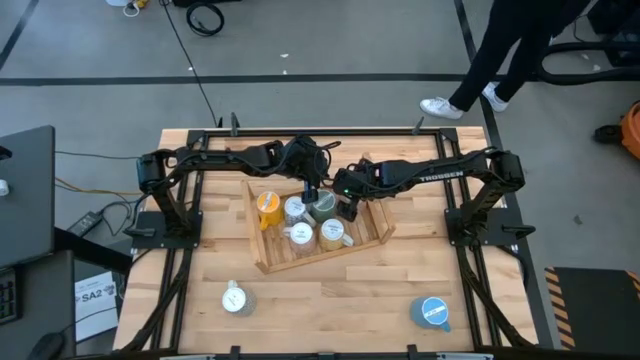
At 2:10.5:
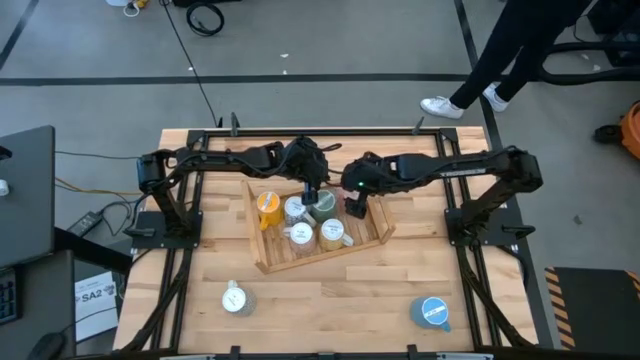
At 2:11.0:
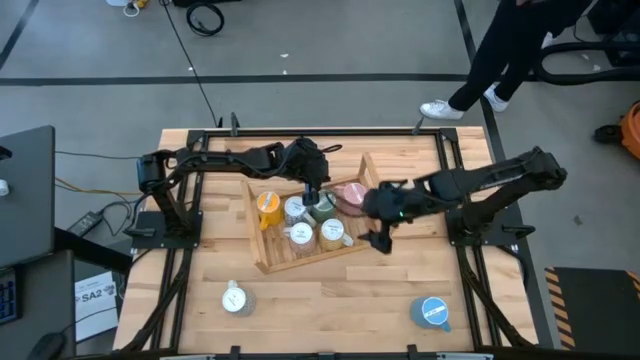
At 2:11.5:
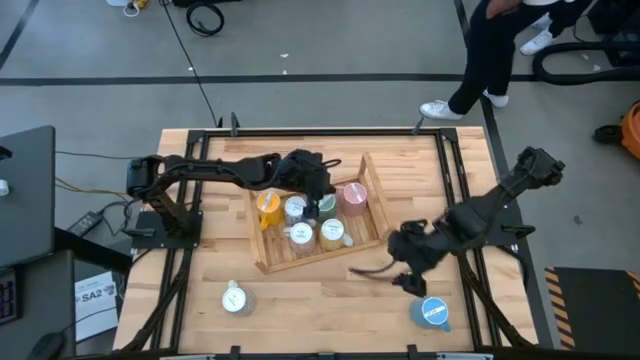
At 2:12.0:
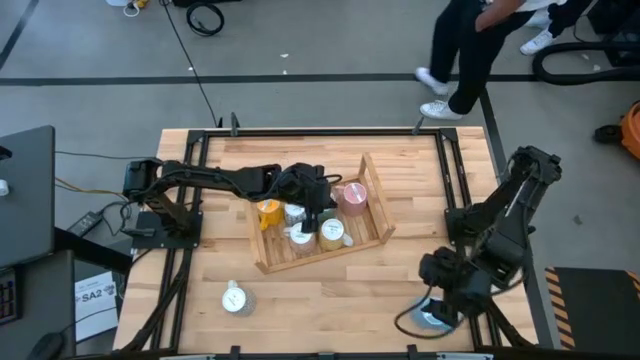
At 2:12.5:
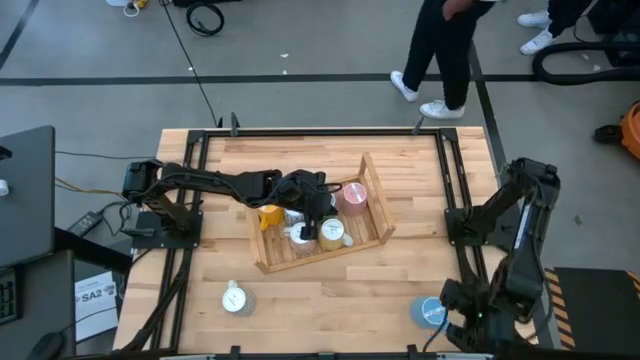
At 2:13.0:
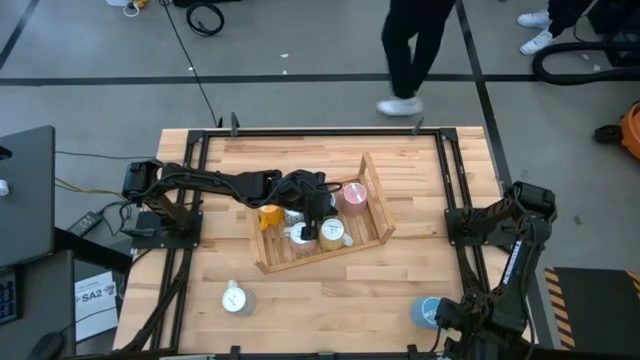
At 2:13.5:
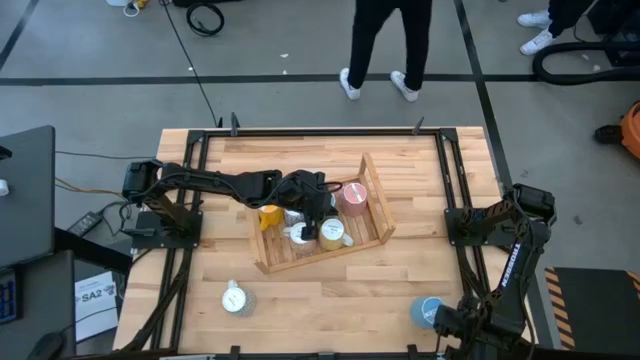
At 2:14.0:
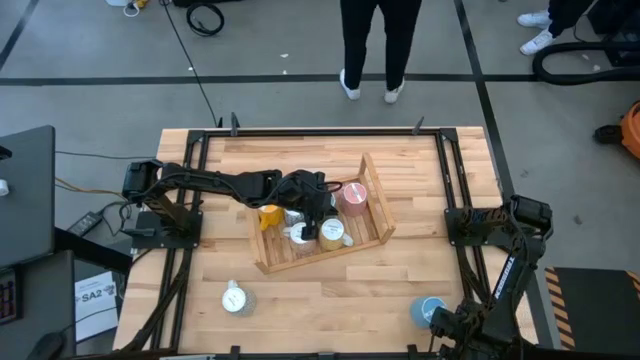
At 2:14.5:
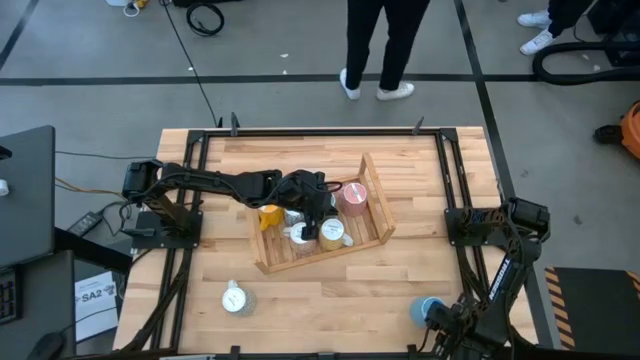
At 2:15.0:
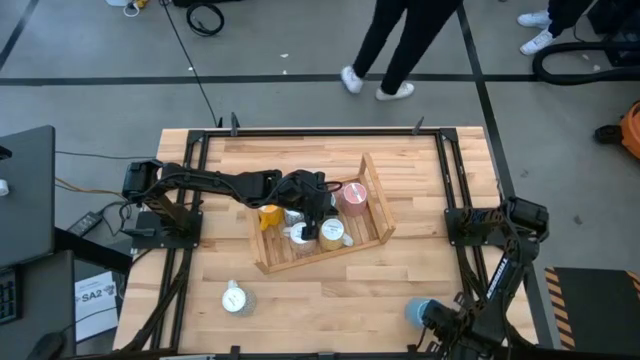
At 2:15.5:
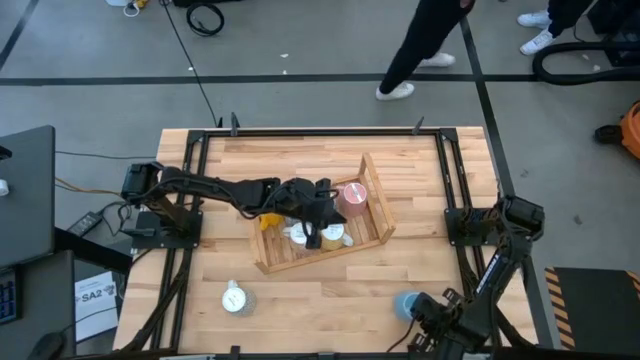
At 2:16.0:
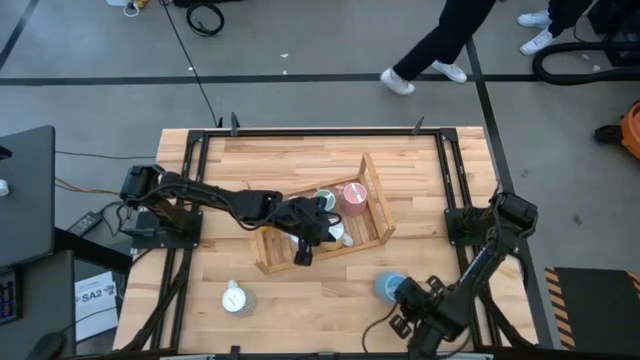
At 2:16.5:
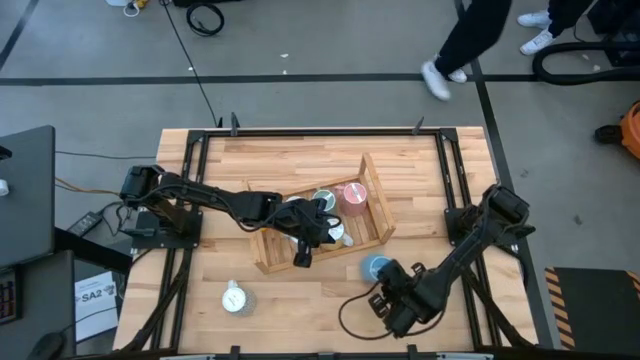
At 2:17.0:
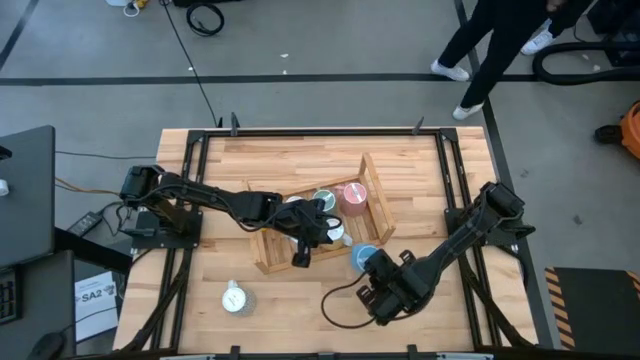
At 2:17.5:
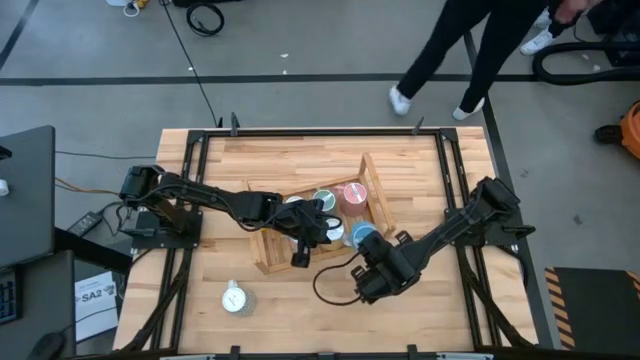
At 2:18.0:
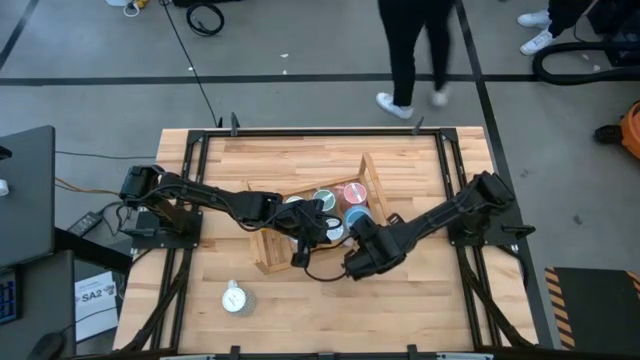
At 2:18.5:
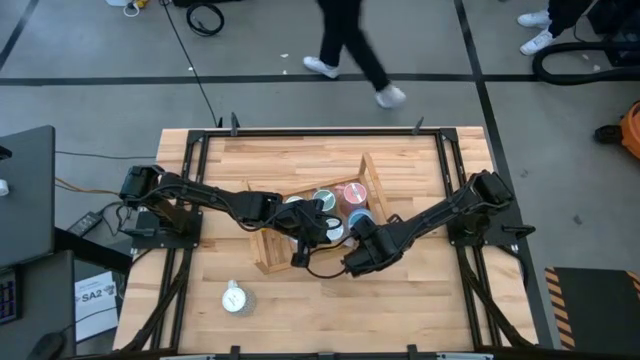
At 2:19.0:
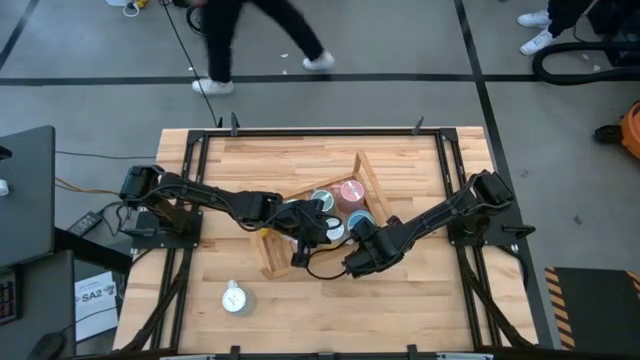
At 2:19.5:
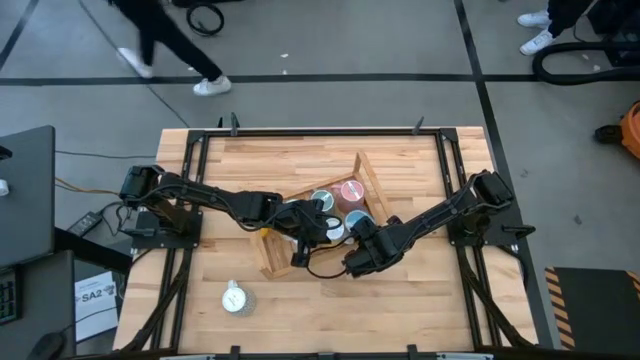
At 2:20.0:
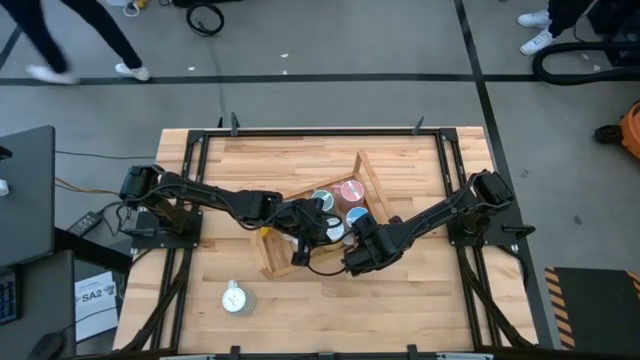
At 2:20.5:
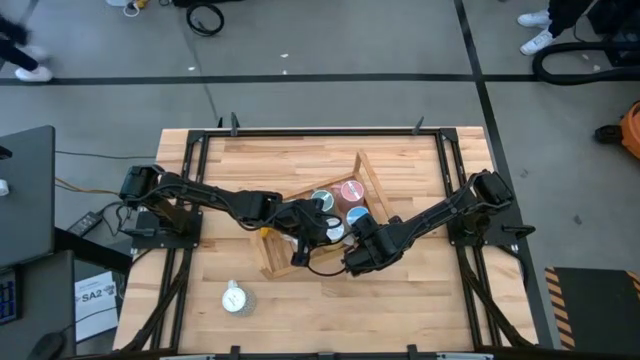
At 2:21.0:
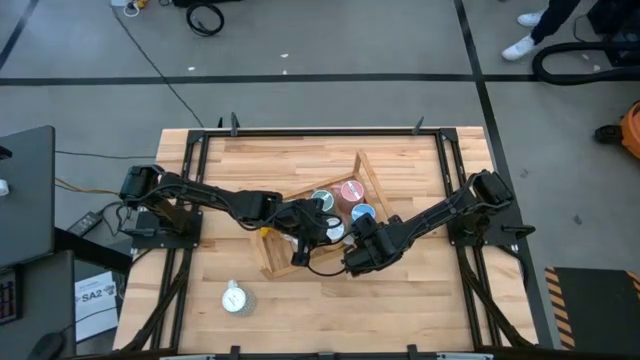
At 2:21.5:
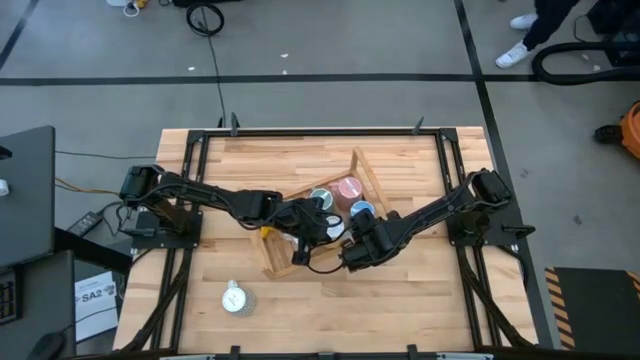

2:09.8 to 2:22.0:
Task: Place coffee mugs
Put the blue mug on the shelf

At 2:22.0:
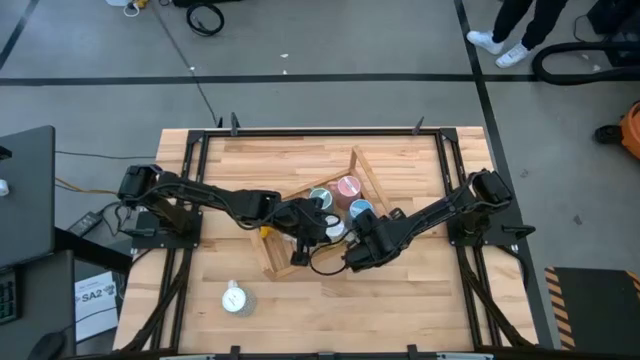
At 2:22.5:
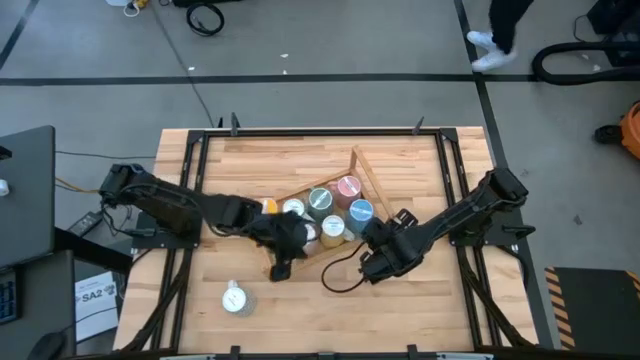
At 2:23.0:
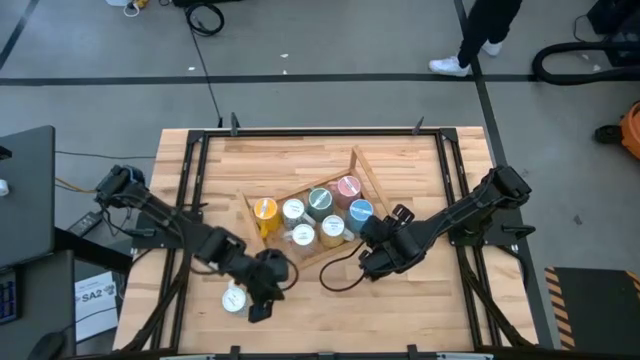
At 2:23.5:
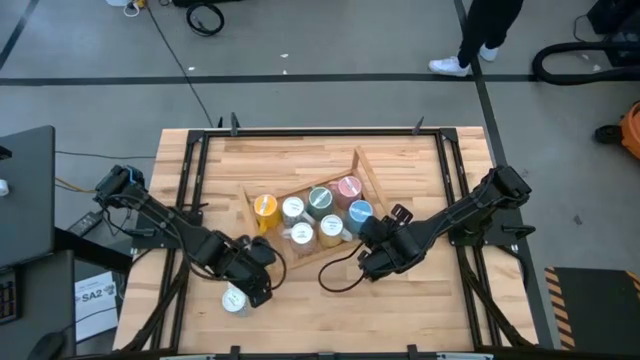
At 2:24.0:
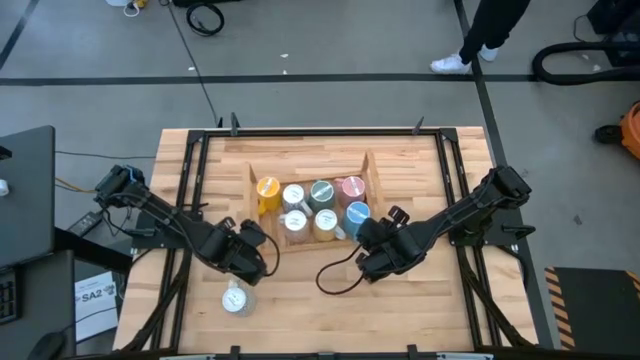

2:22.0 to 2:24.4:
Adjust the shelf

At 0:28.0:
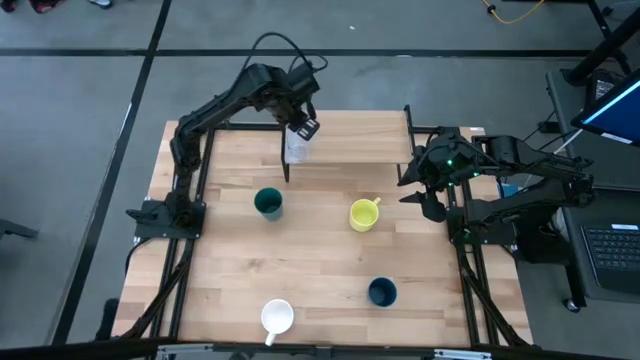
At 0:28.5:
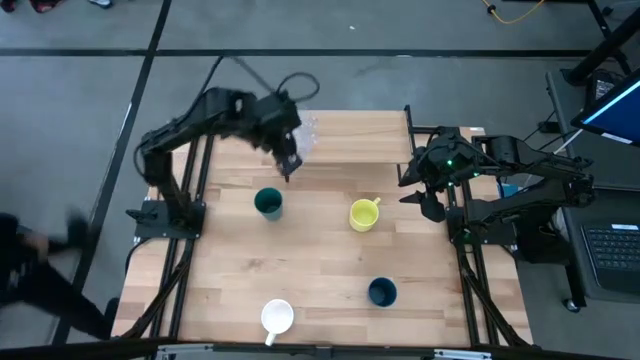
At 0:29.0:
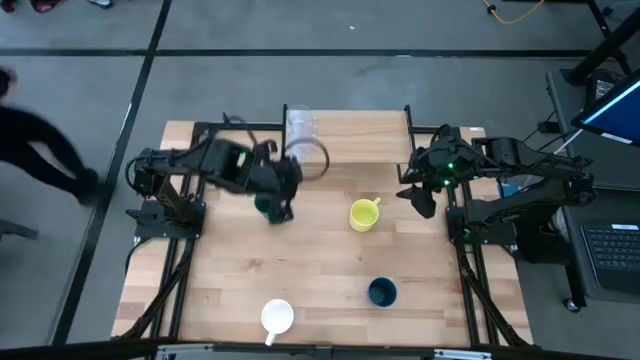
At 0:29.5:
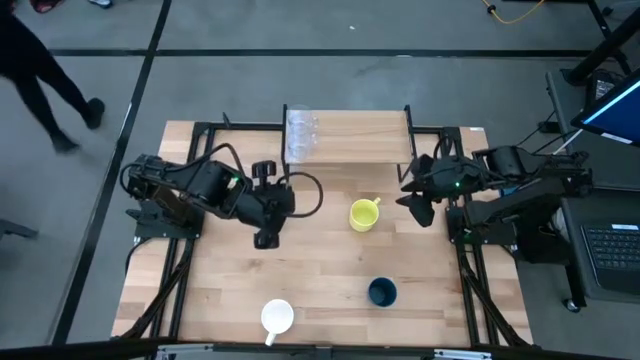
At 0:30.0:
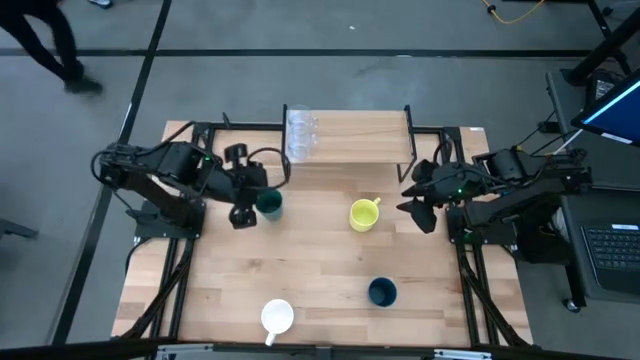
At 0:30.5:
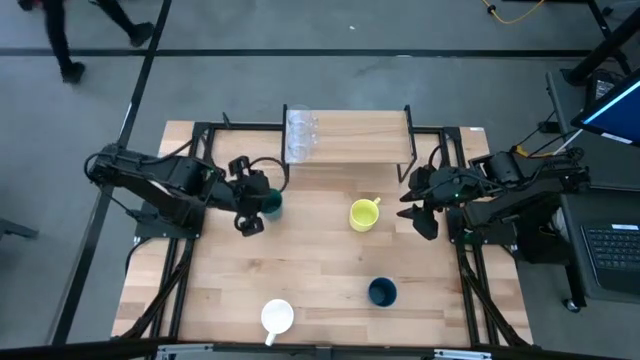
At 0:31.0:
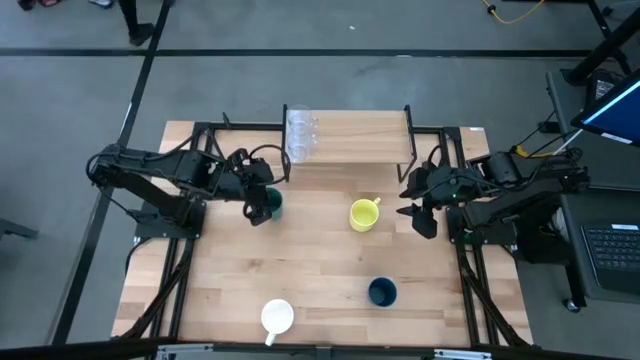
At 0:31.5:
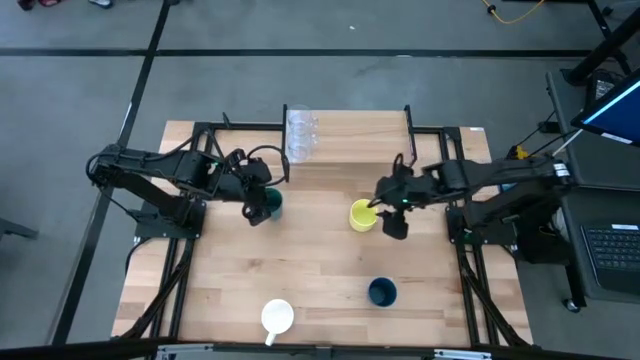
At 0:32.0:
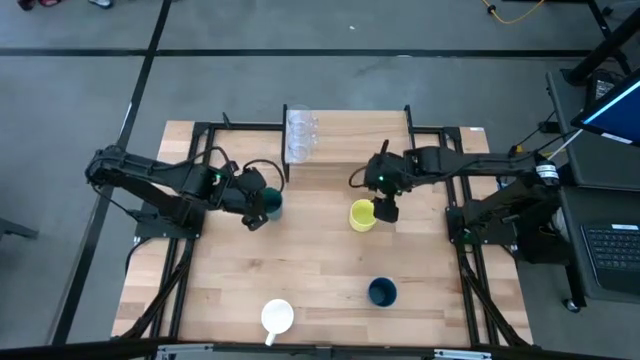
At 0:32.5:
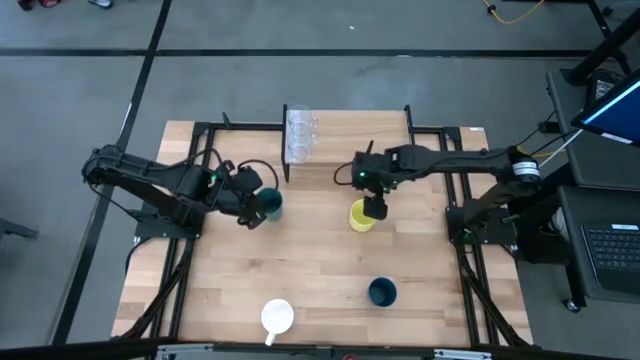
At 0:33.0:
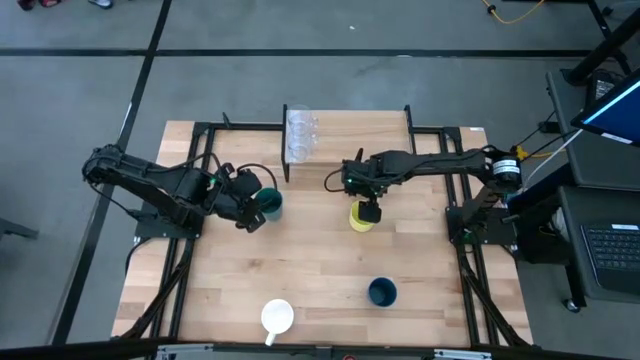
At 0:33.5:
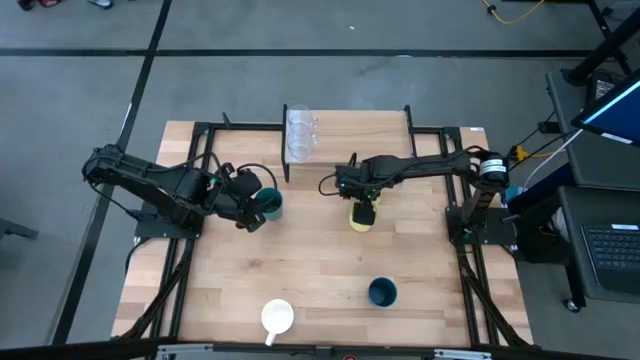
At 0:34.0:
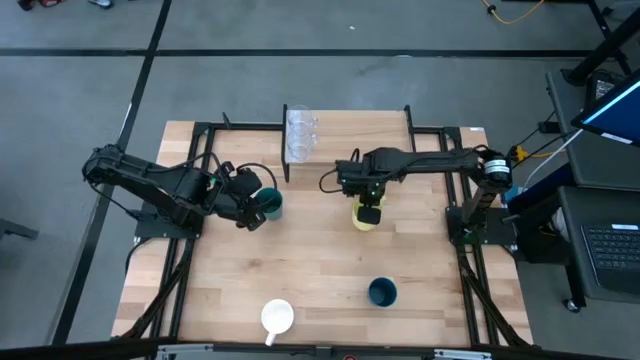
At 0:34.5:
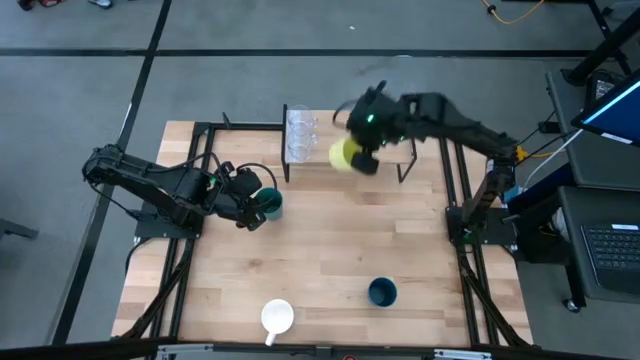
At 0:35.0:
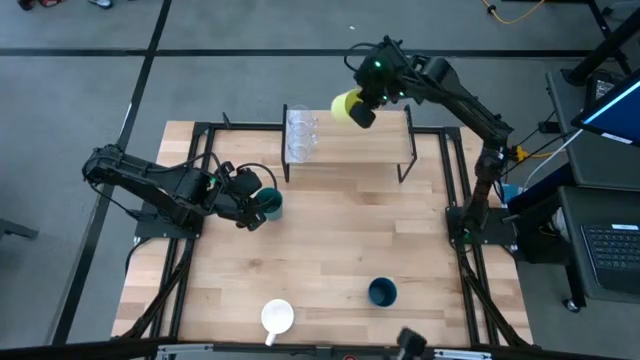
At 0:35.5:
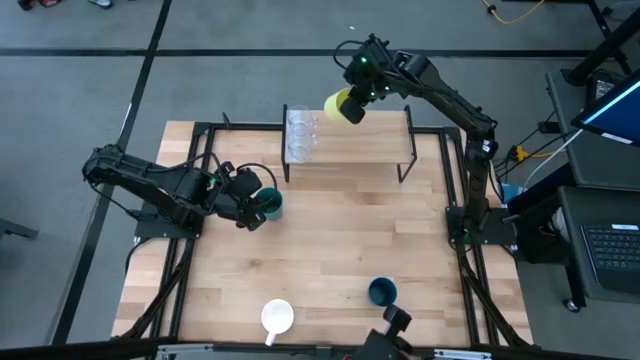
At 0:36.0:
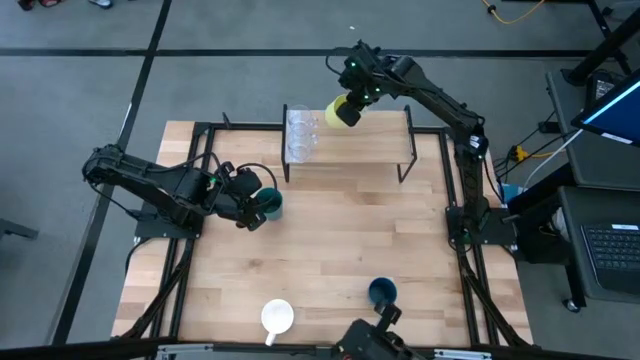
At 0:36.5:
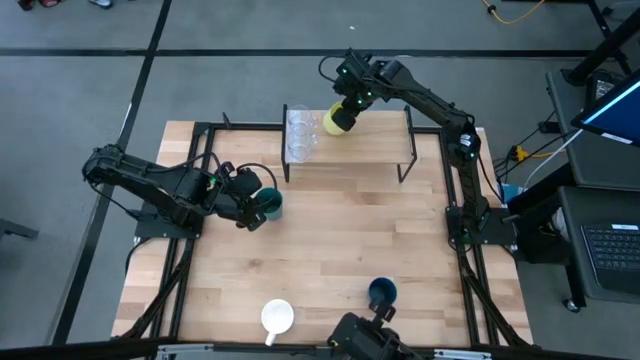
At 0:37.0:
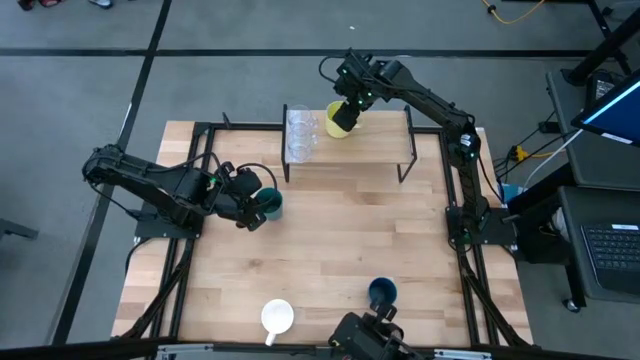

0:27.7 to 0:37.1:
Task: Stack small to large cups/mugs on shelf
Put the yellow mug on the shelf beside the transparent mug
